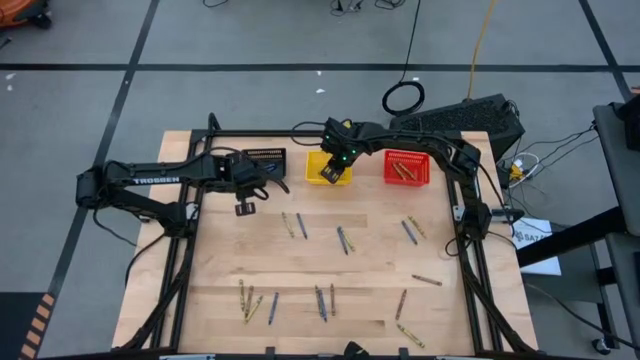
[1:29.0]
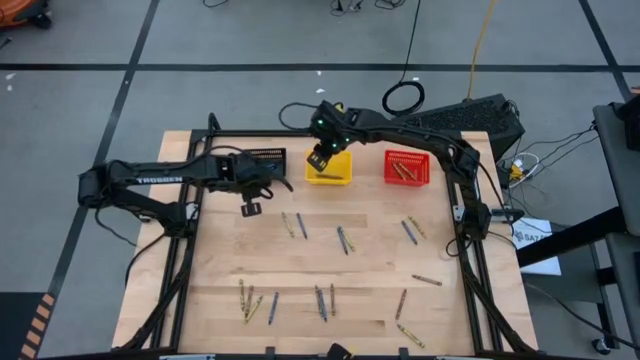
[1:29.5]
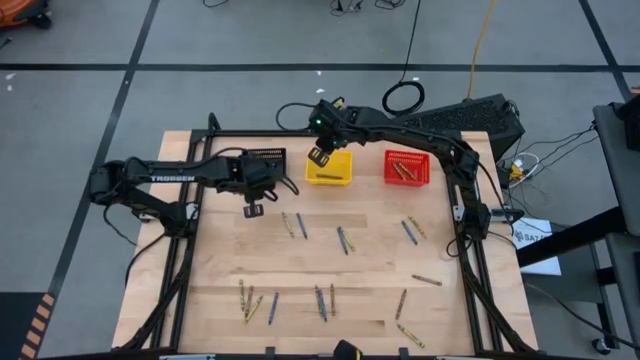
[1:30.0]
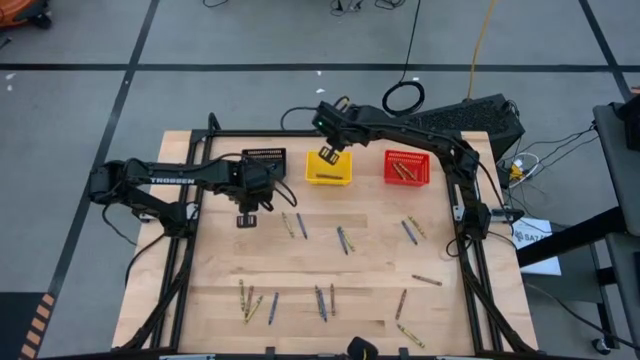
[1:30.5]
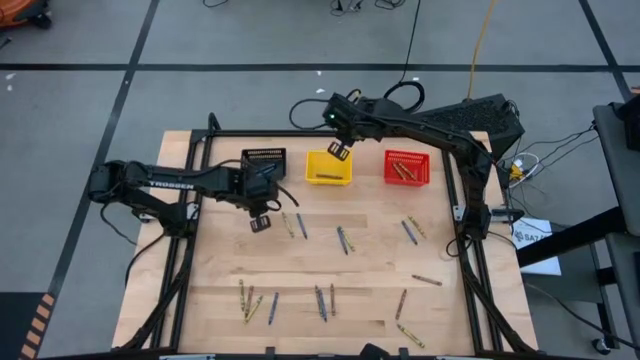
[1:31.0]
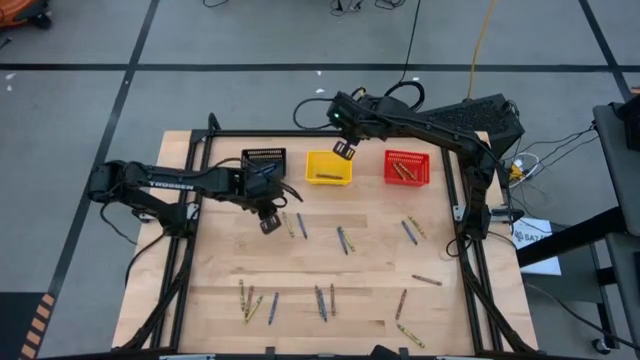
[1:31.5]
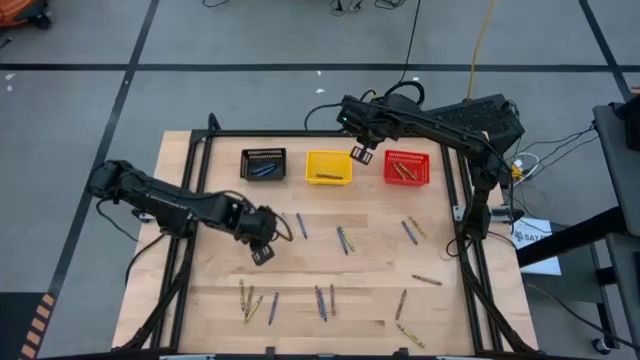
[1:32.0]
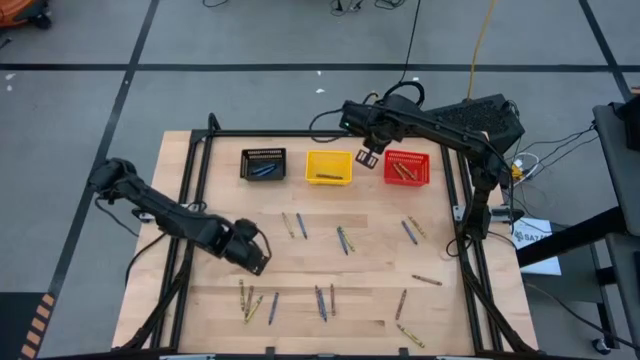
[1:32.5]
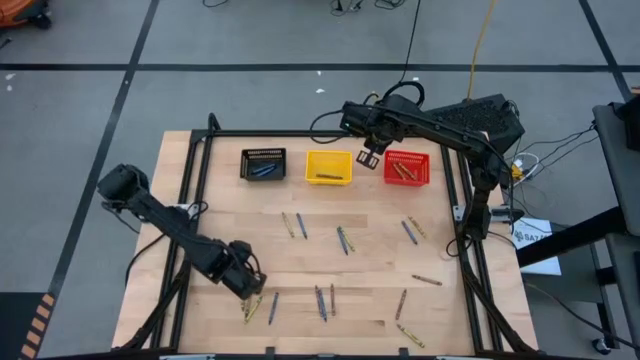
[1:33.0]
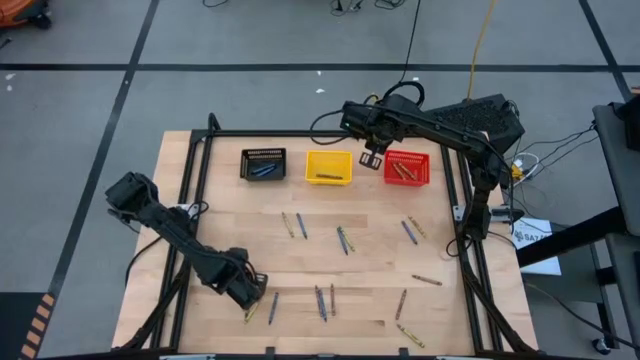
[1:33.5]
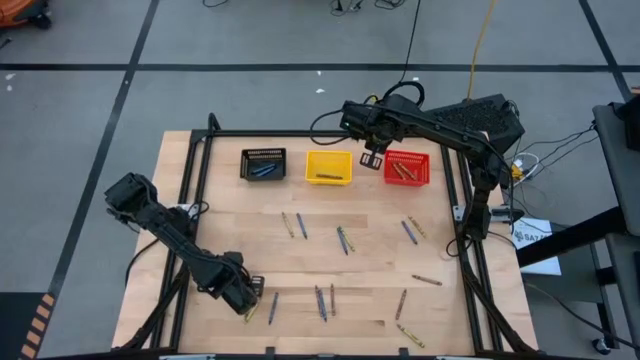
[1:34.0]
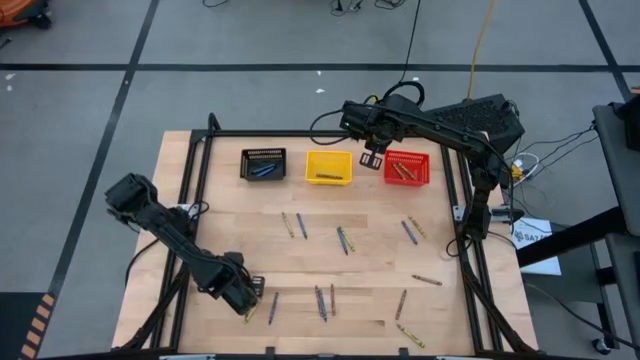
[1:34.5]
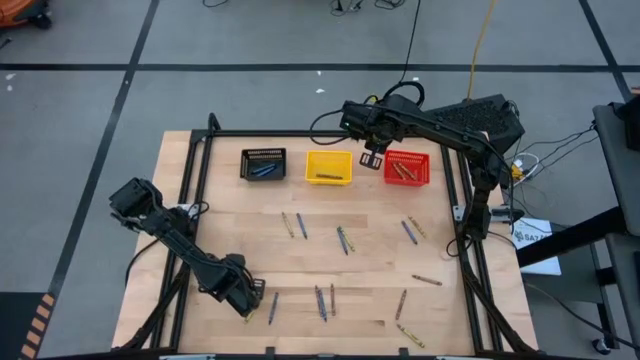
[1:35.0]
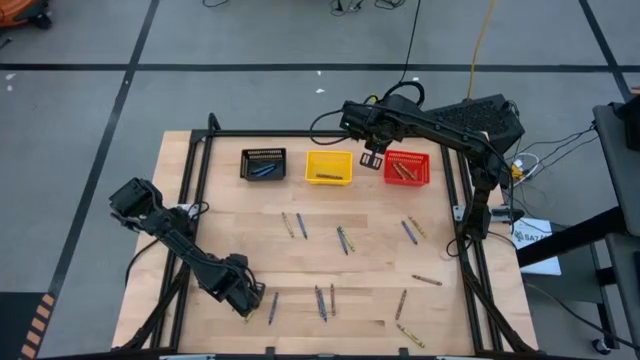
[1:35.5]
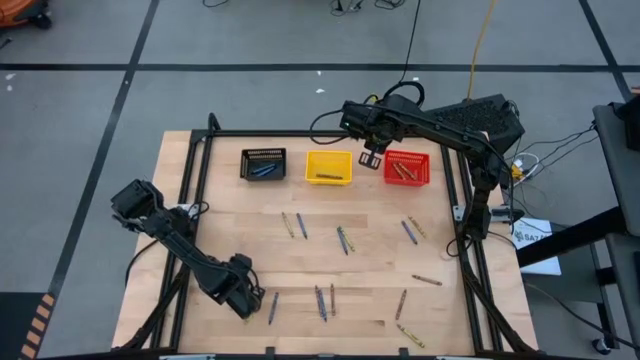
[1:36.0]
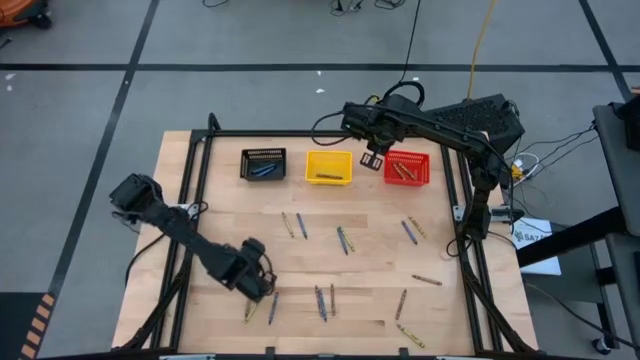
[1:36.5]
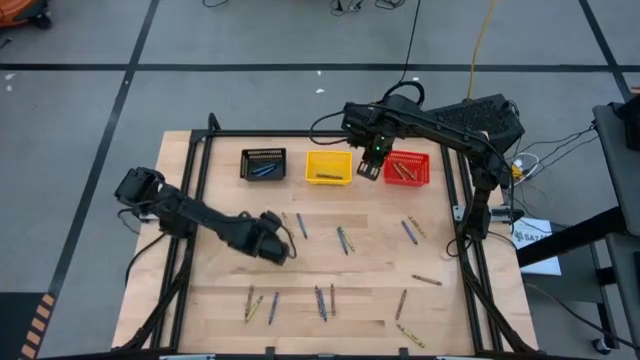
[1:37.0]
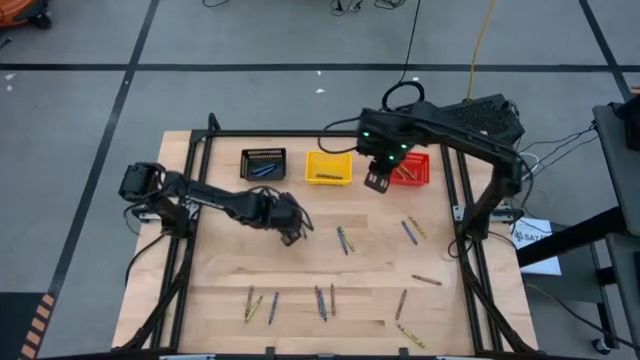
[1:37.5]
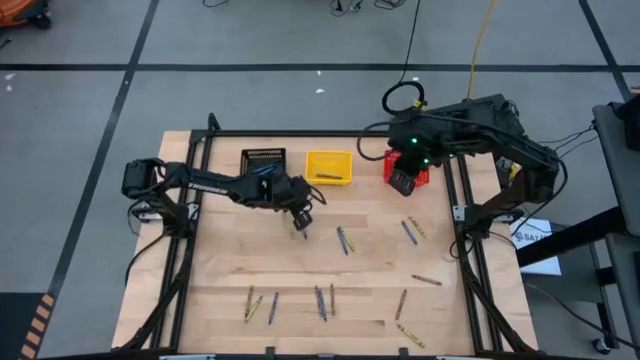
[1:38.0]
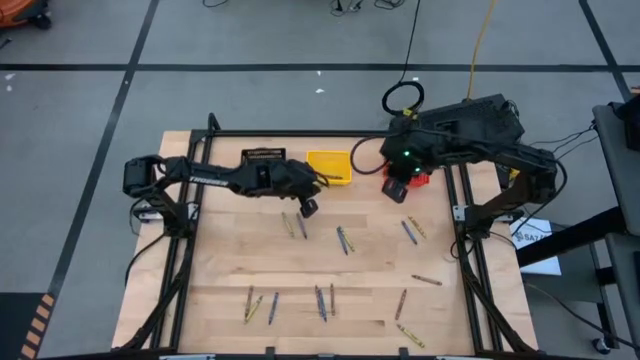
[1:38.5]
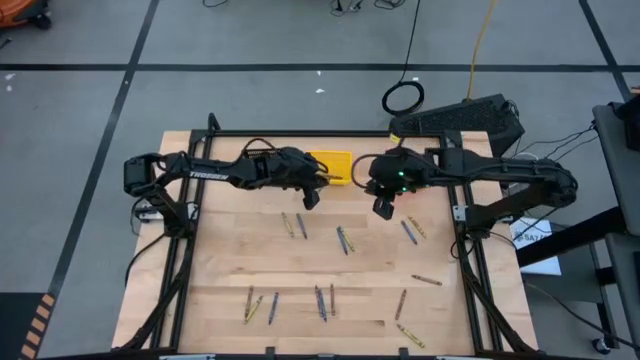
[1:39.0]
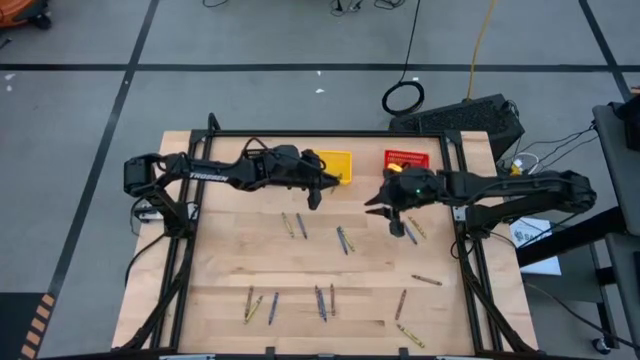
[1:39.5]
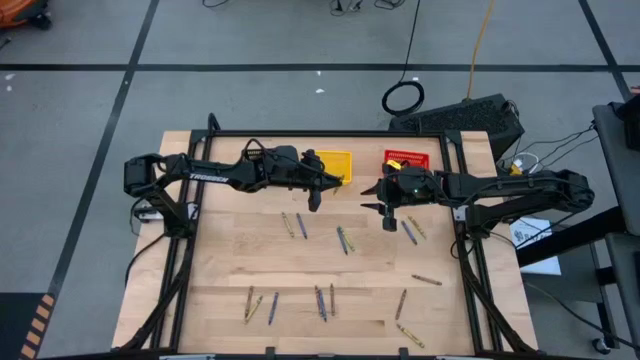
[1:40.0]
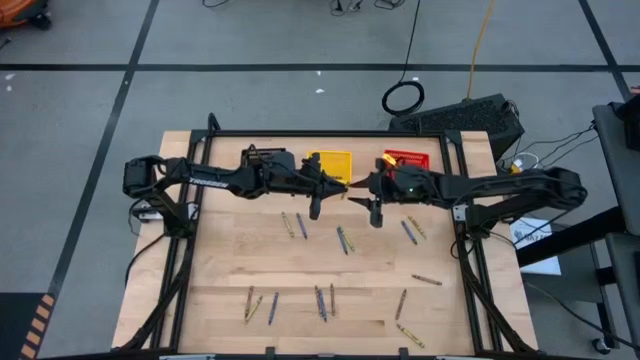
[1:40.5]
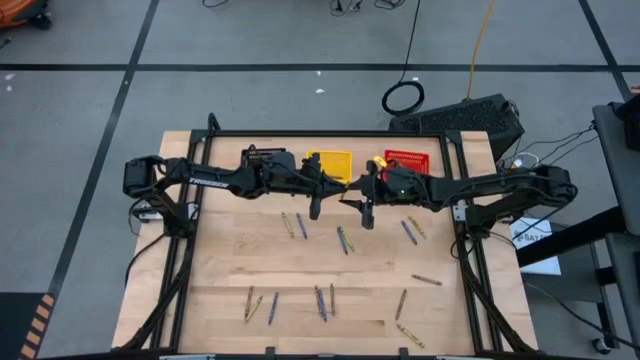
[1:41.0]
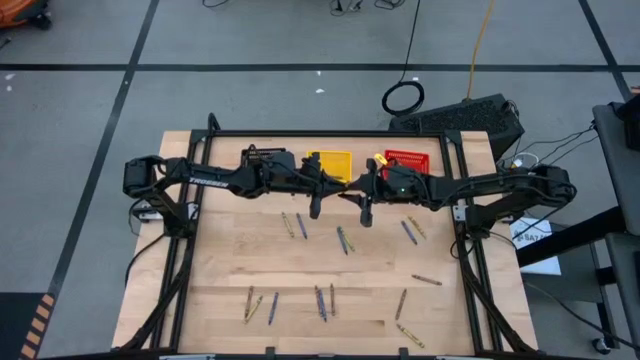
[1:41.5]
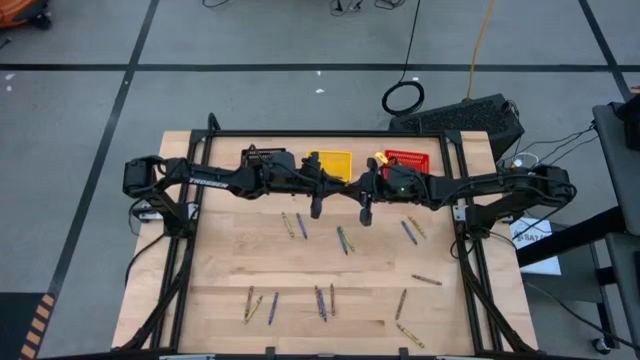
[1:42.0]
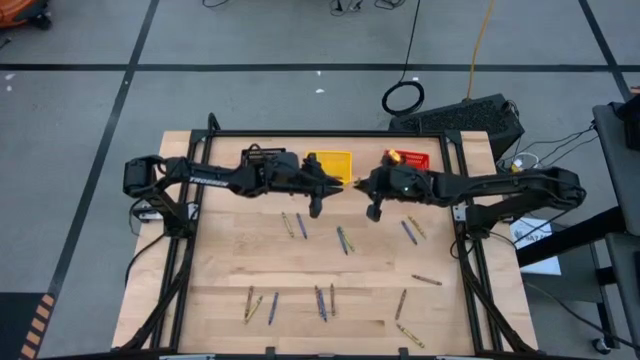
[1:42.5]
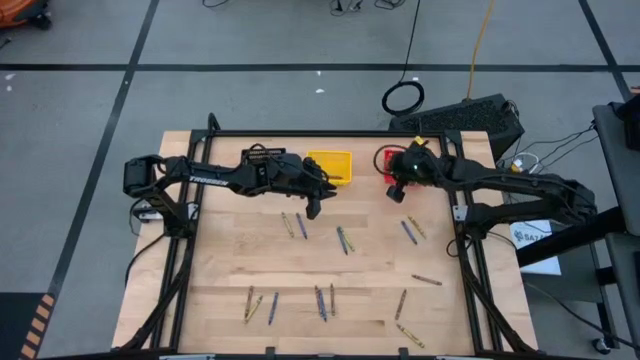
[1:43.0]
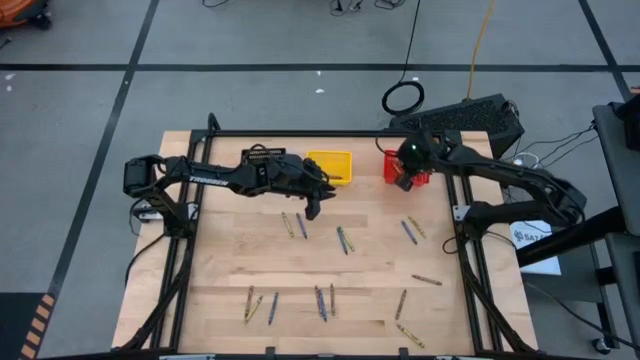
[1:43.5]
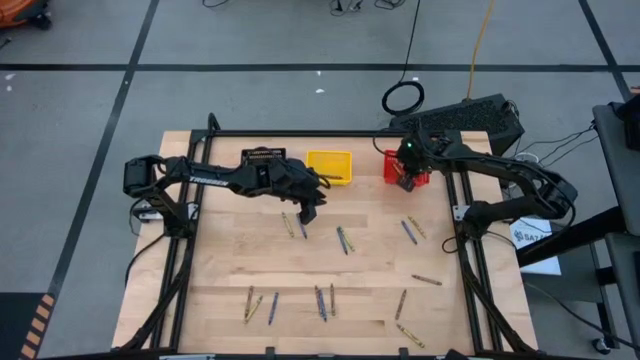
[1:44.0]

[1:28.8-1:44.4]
Task: Sort crayons
Put the green crayon into the red bin

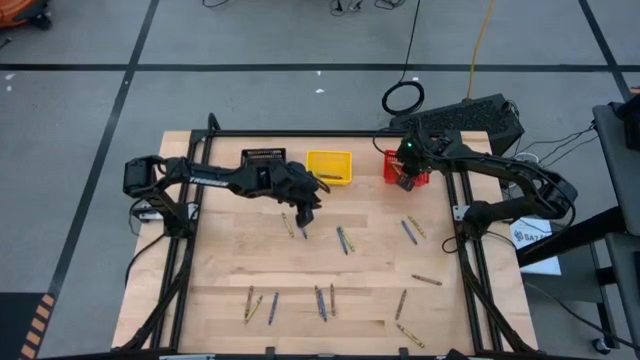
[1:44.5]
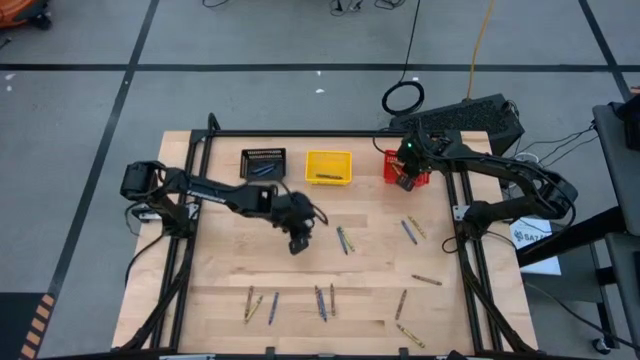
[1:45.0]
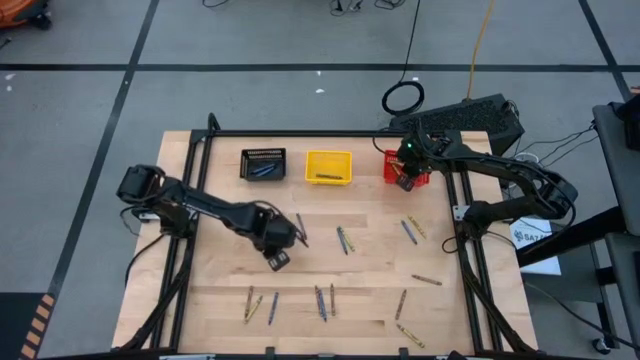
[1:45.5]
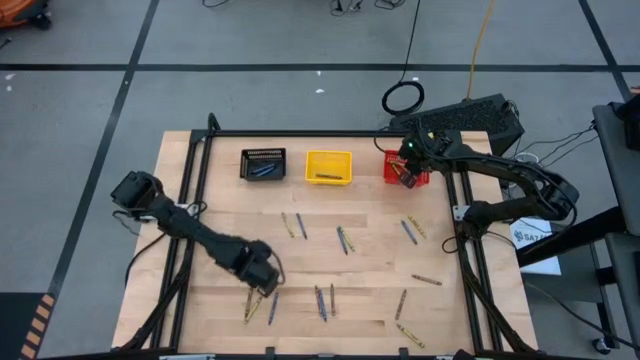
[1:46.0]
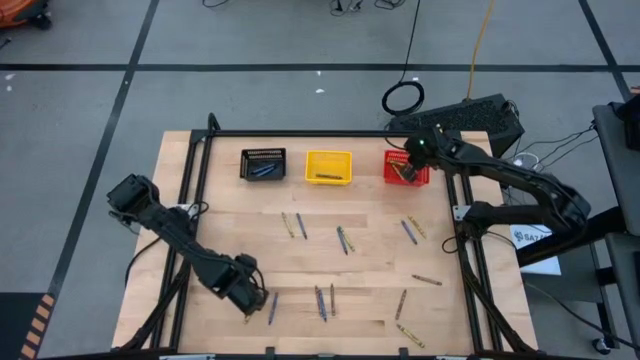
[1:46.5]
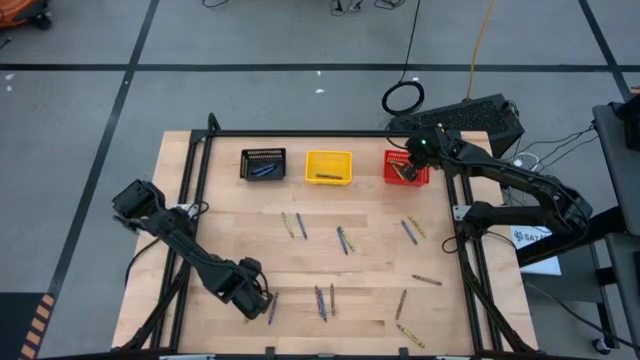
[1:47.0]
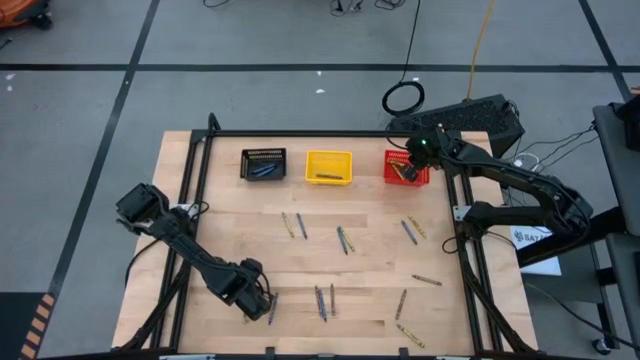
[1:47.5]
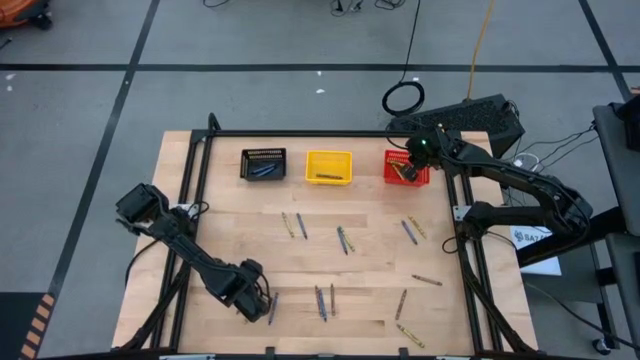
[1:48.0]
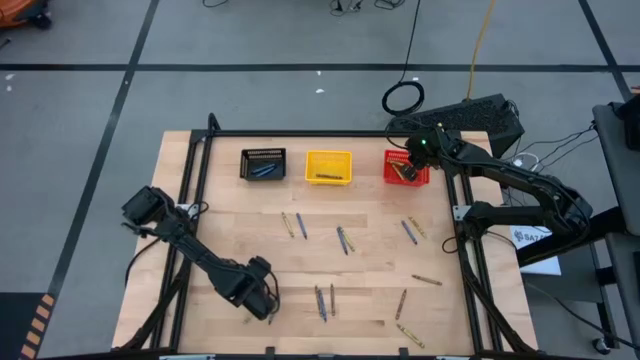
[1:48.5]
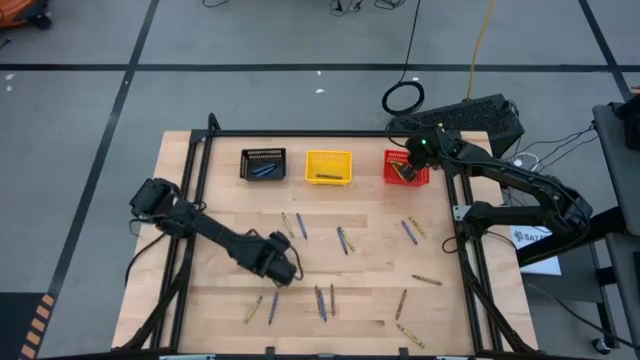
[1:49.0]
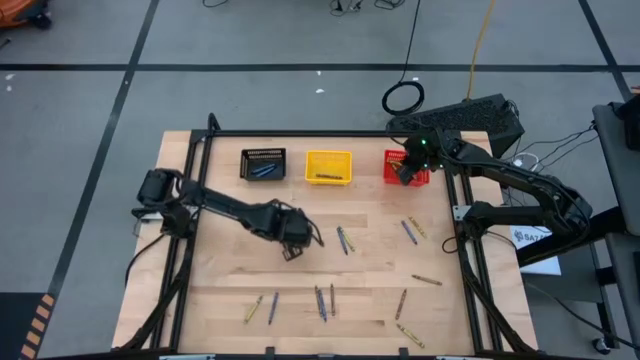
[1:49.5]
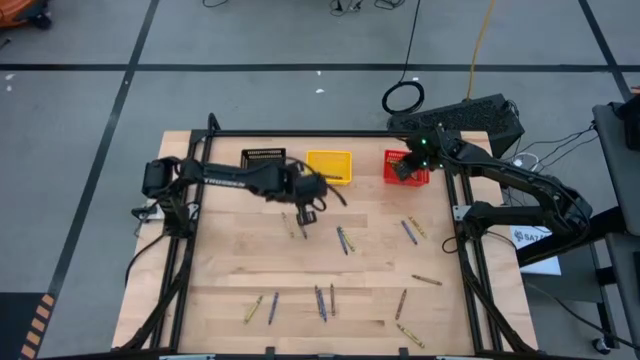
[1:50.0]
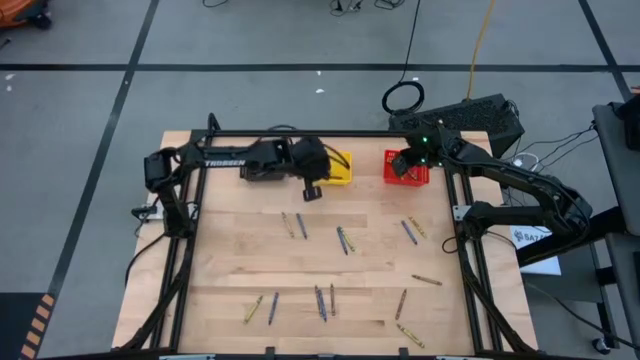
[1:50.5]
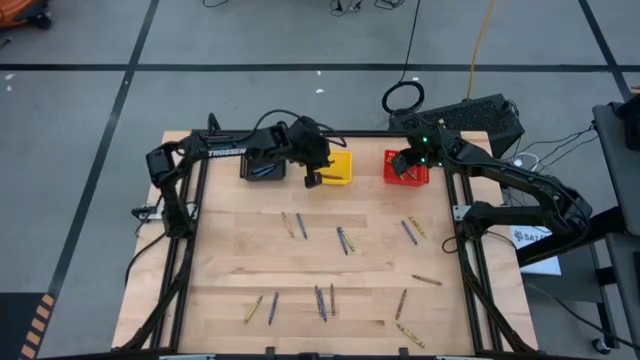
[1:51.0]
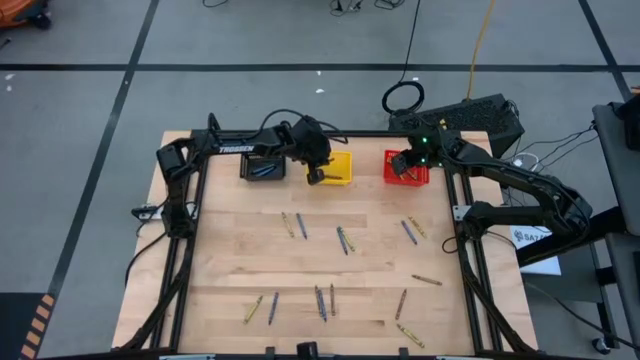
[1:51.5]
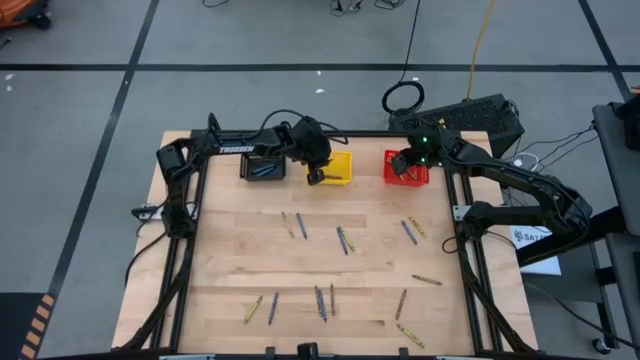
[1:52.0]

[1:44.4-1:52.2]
Put the brown crayon into the yellow bin
